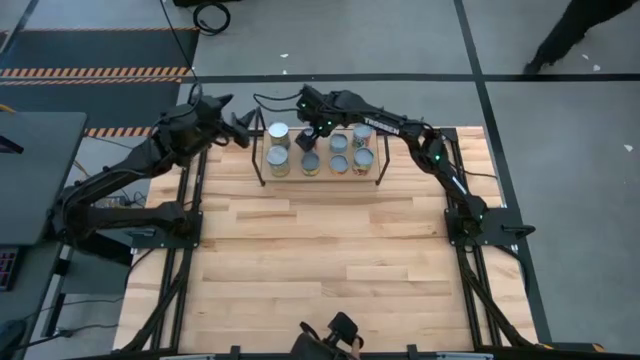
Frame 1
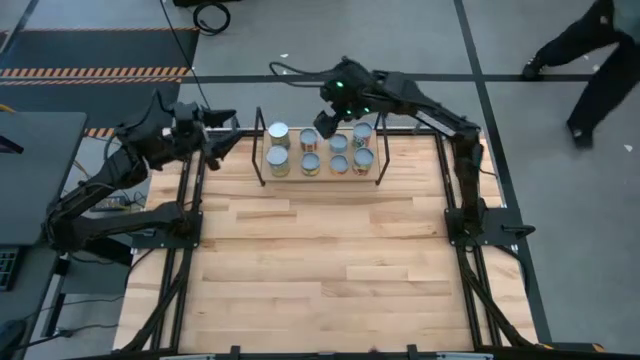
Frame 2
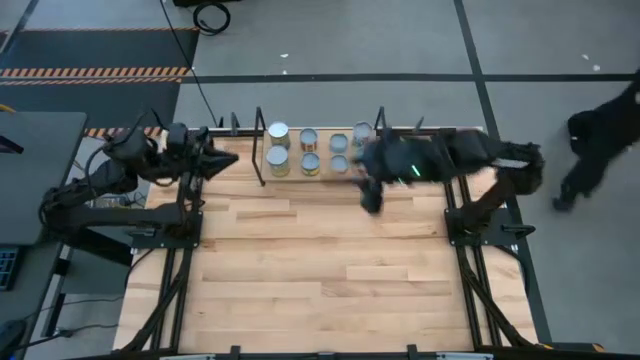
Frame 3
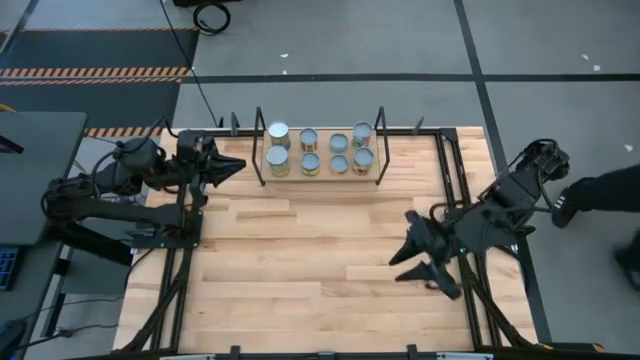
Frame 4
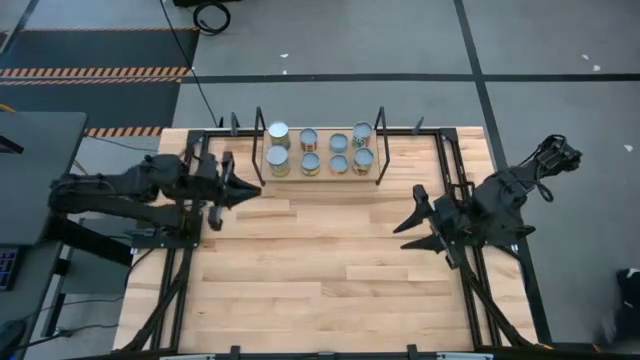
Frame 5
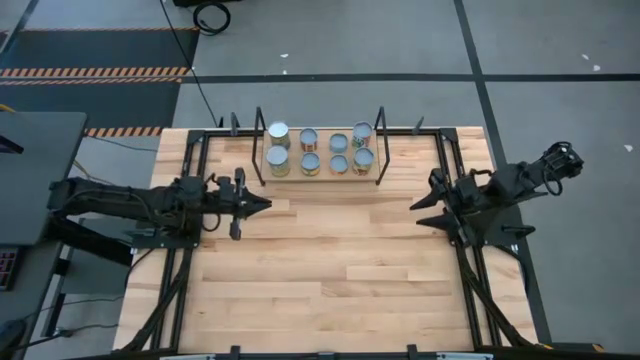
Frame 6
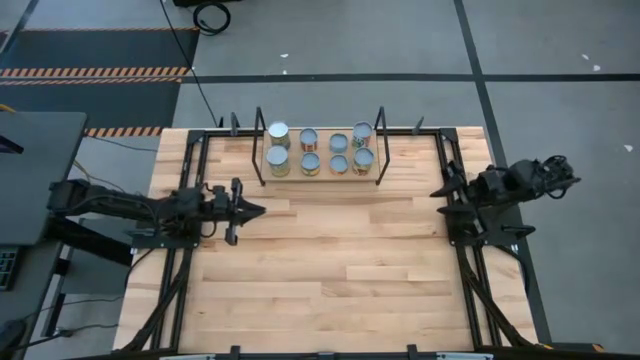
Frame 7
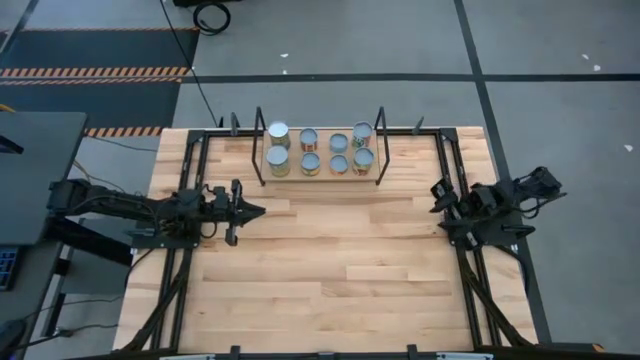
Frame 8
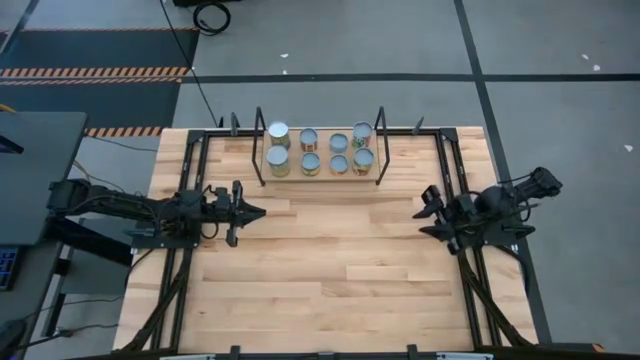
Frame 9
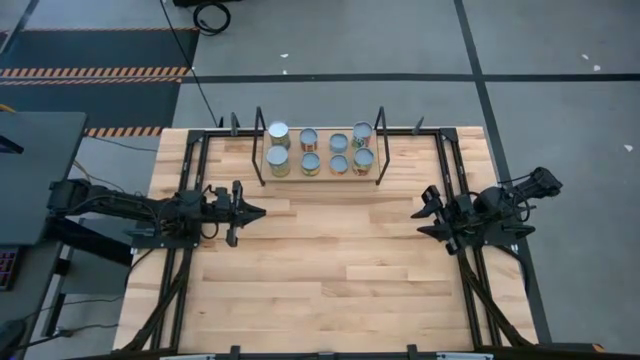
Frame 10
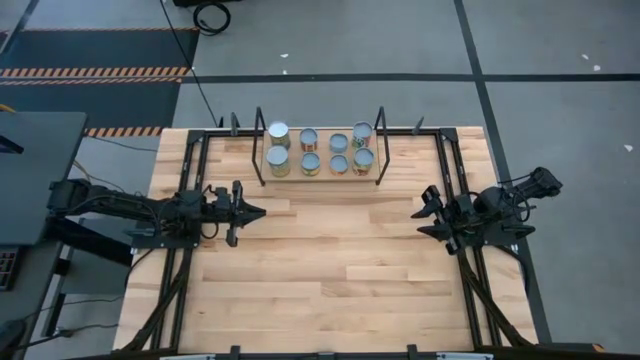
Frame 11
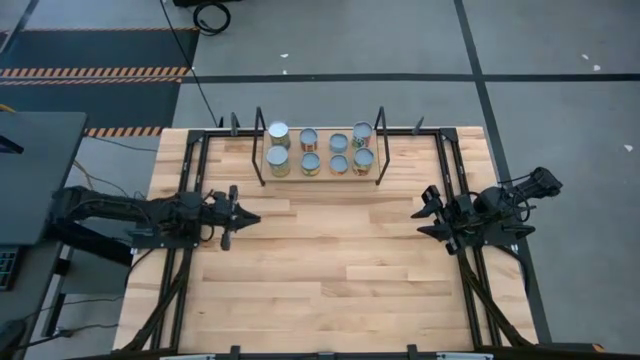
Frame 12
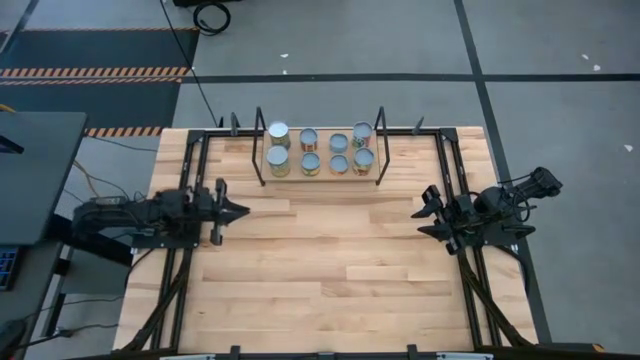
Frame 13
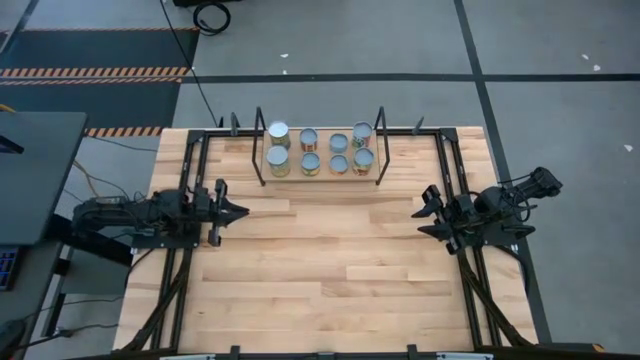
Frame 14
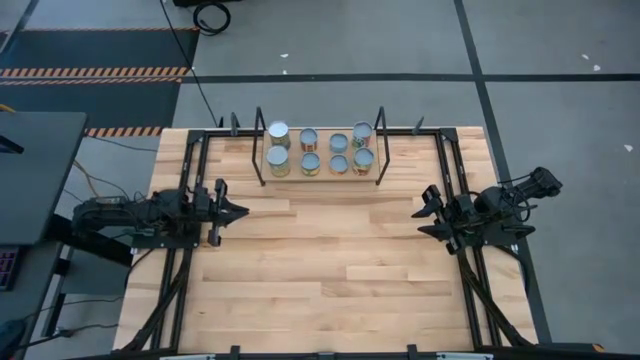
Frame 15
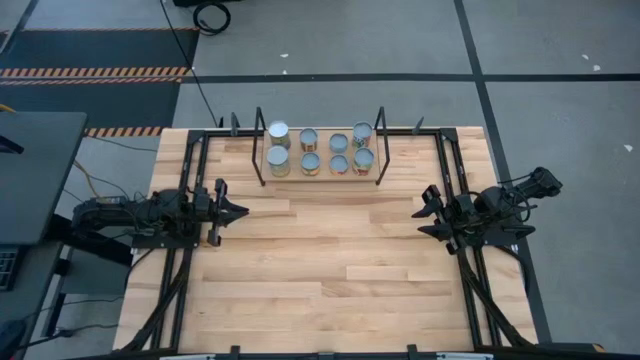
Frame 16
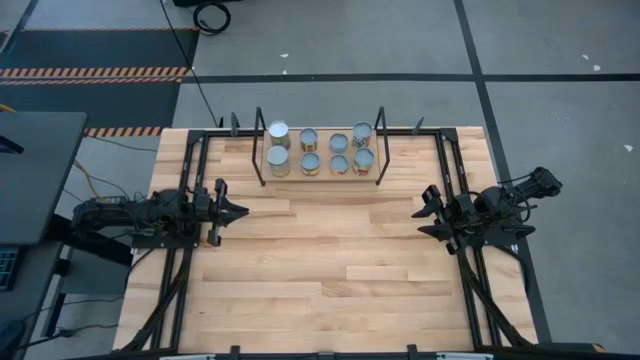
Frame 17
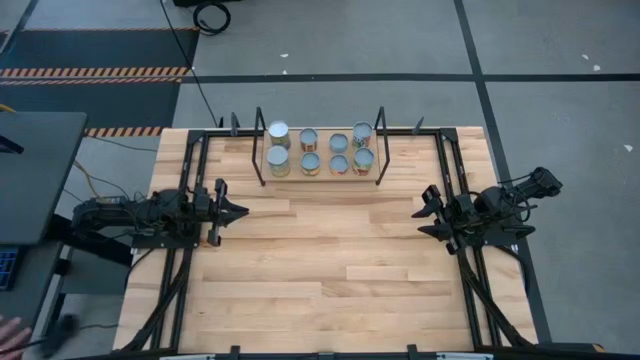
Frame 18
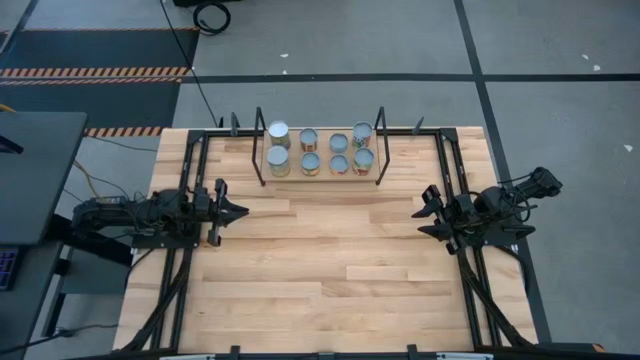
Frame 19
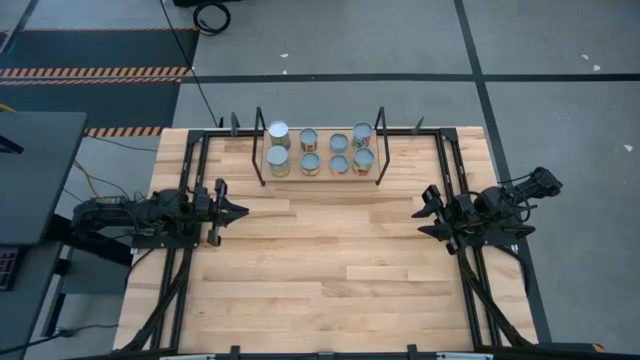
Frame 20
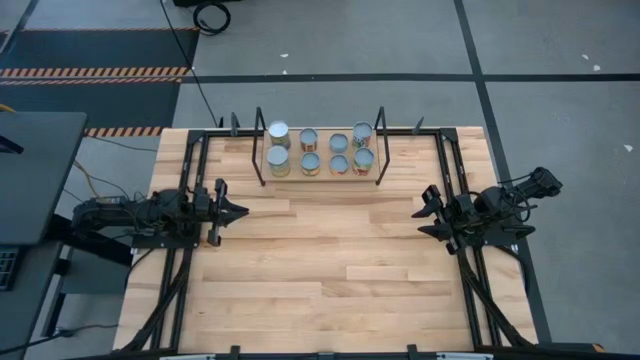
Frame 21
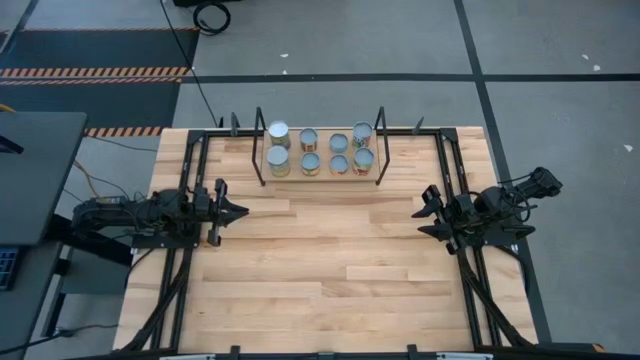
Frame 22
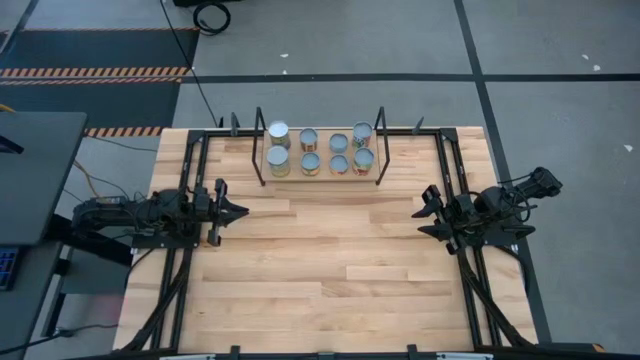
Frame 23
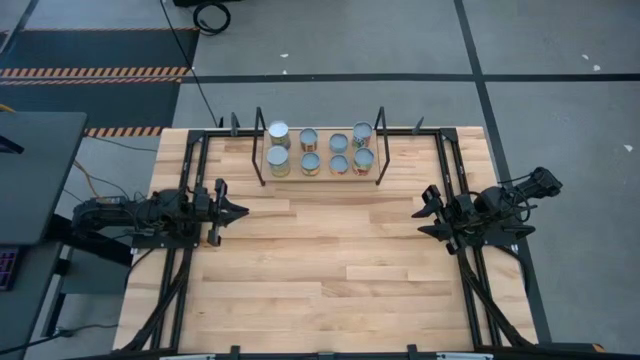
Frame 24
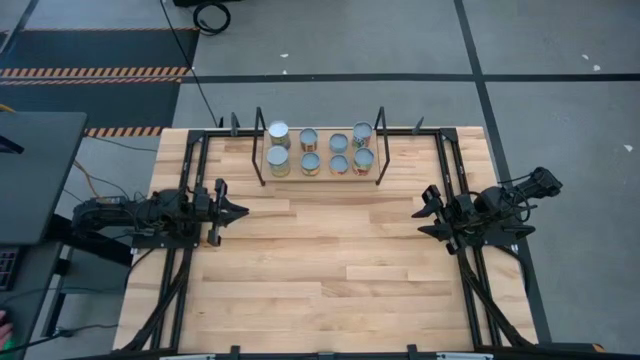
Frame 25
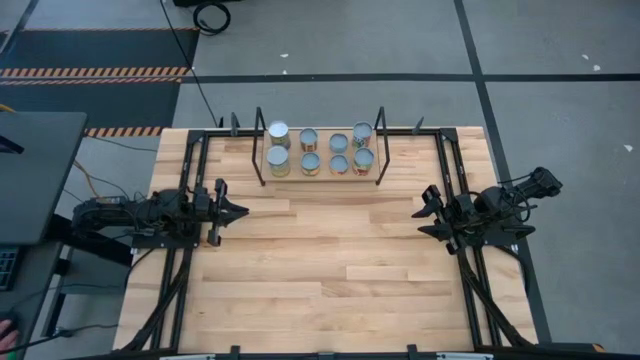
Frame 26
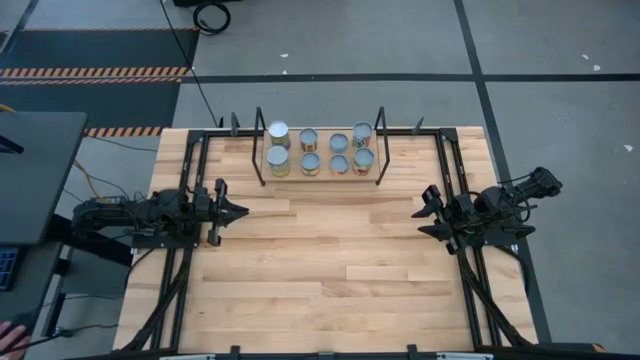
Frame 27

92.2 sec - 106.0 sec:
Task: Pick and place cans onto a shelf
Return to Home Position
